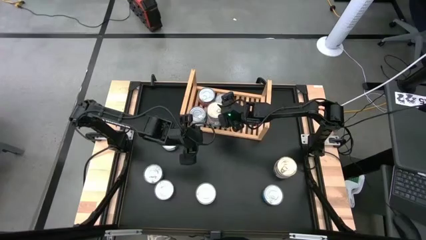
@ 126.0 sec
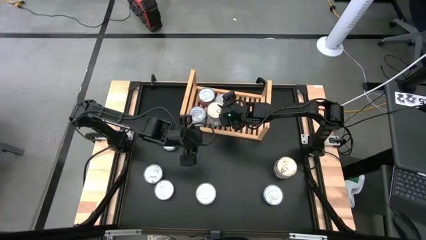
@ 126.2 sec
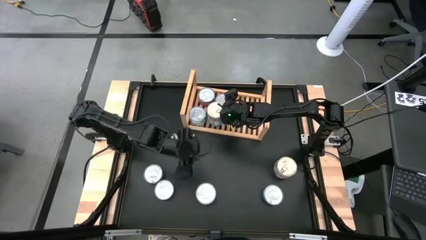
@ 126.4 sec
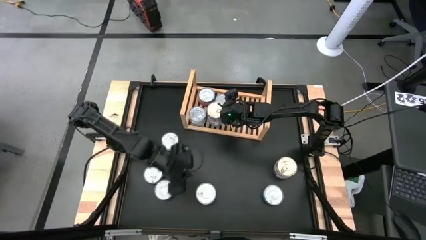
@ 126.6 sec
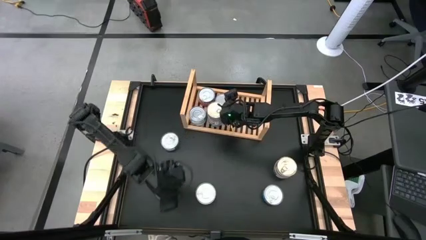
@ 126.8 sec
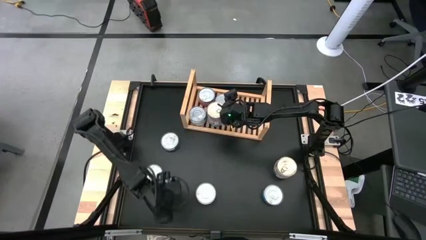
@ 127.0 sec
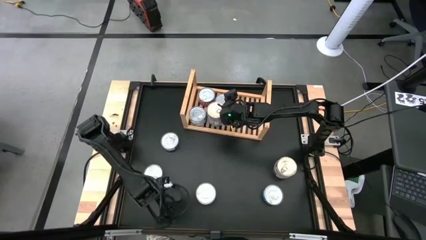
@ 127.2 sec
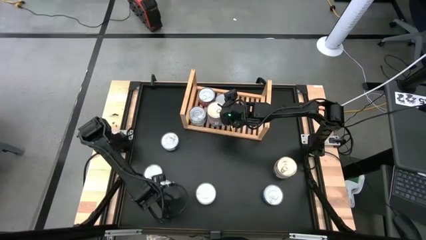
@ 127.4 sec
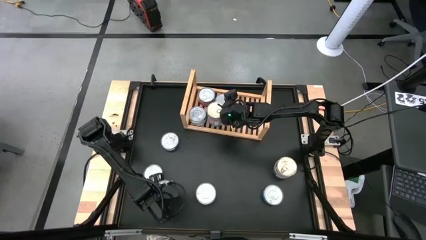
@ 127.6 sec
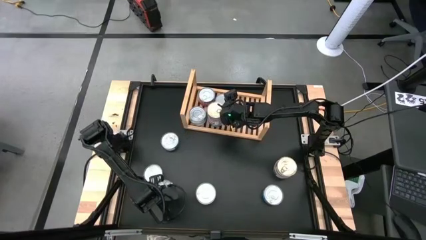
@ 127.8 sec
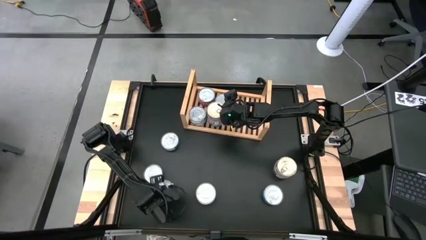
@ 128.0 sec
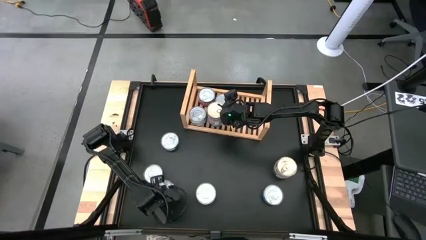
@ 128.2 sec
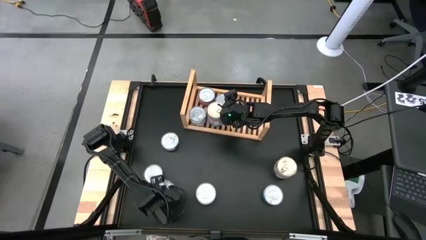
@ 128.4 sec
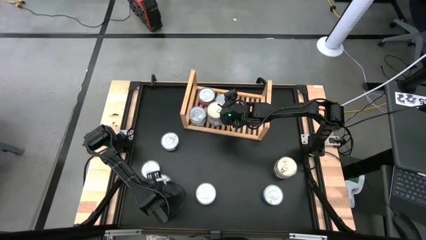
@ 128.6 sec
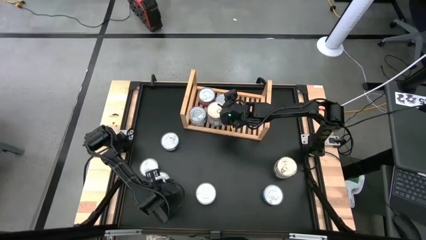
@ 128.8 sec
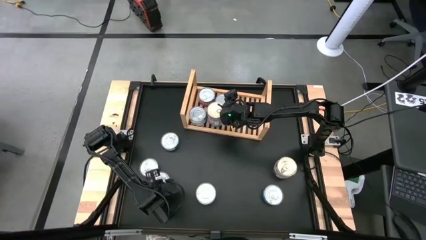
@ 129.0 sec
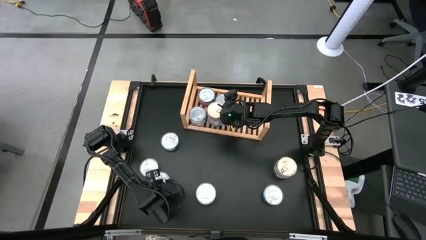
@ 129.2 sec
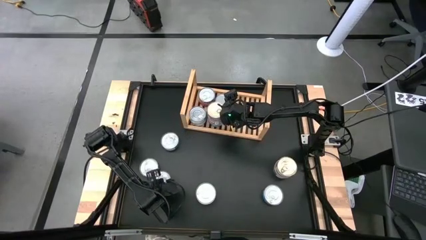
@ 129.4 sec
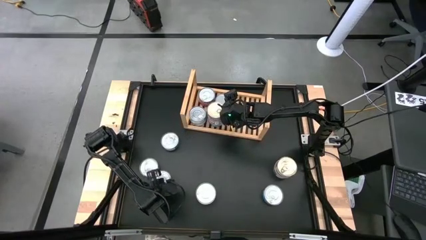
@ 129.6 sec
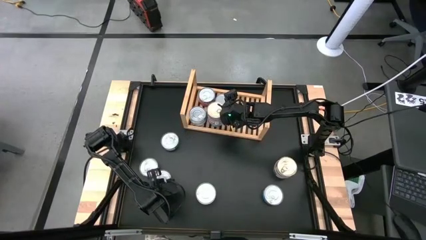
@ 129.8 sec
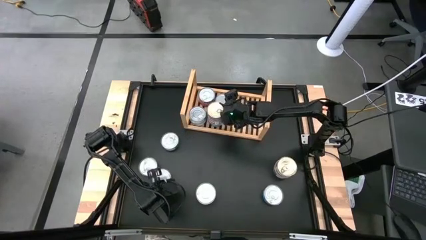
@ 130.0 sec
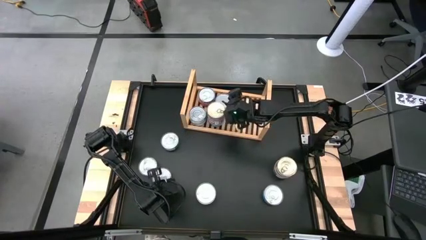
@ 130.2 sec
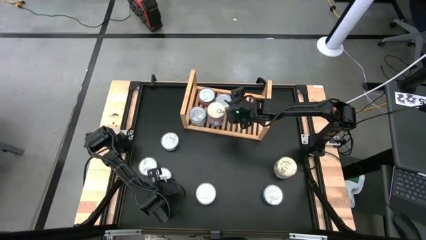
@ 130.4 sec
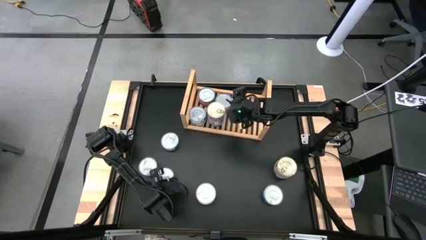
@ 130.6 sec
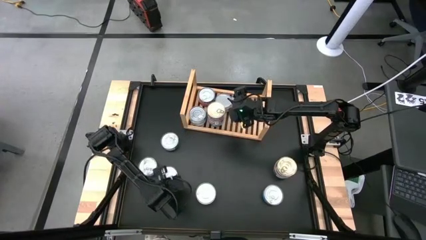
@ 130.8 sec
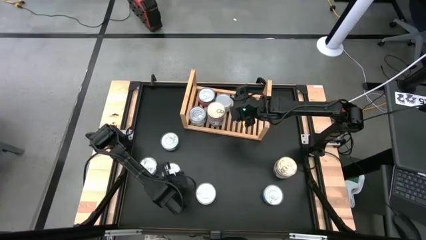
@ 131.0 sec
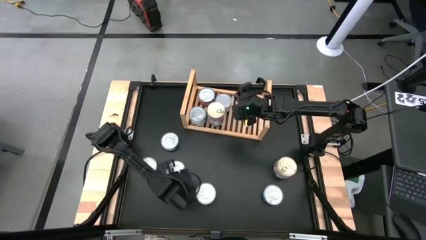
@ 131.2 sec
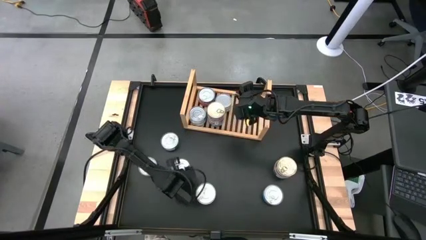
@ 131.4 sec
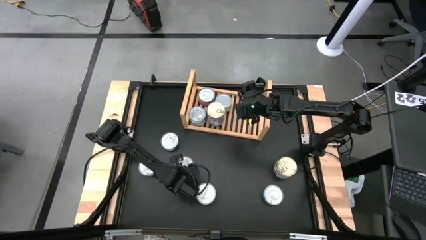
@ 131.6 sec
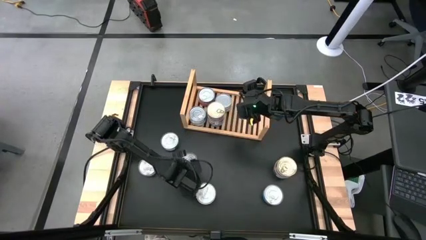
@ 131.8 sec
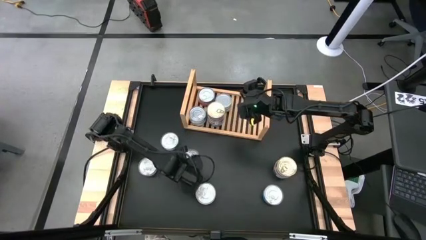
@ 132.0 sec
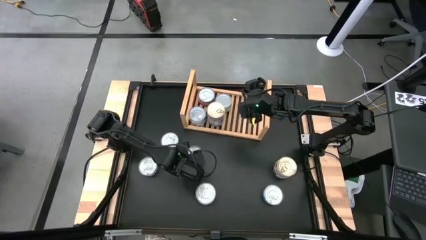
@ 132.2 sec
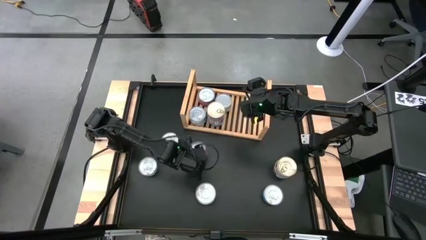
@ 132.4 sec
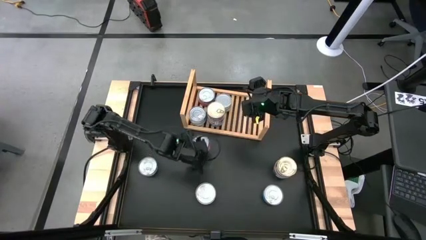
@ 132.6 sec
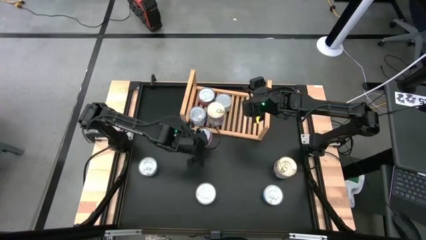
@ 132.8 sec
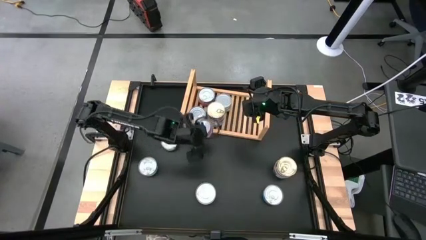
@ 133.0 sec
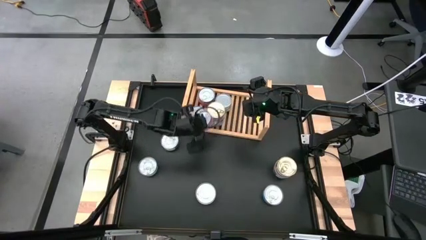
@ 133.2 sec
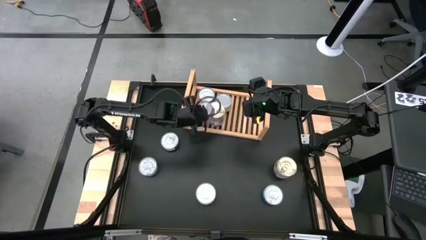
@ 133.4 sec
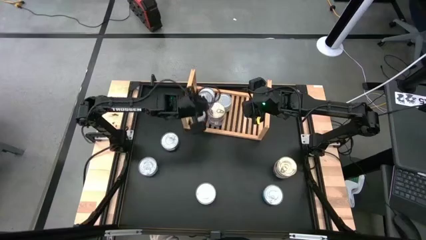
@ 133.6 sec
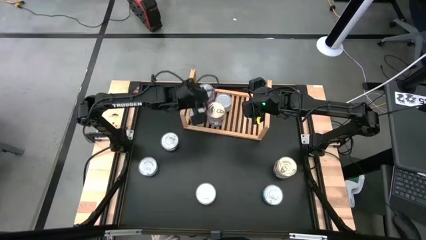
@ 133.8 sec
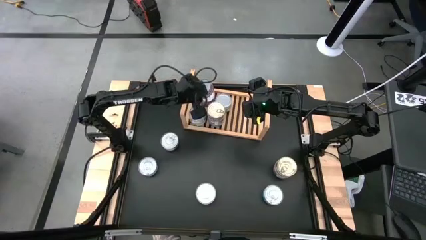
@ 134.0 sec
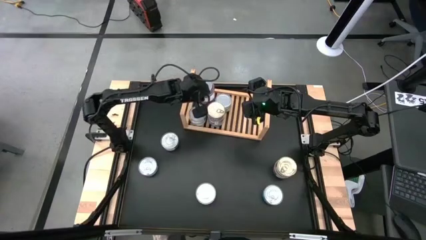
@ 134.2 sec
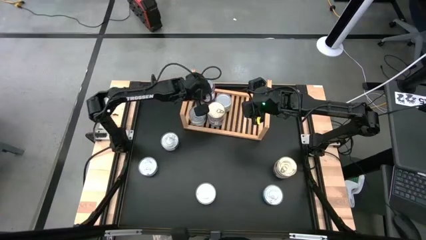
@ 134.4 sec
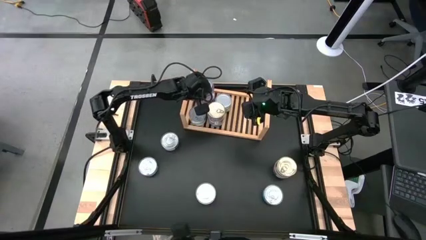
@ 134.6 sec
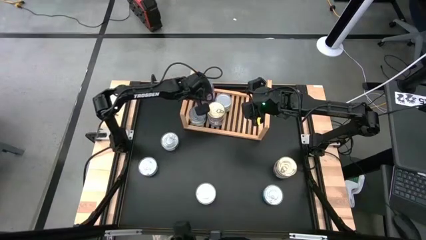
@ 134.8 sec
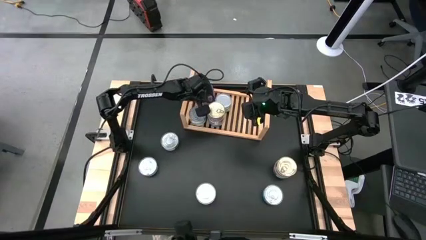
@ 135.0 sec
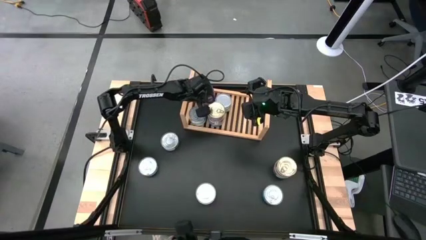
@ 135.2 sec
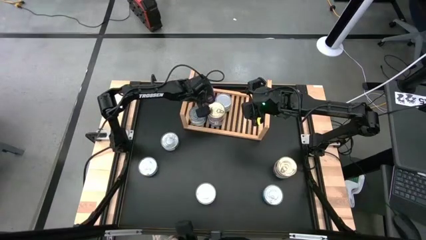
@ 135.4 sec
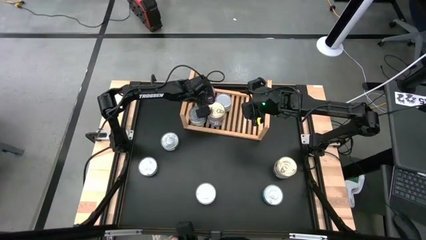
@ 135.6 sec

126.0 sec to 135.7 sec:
Task: Stack canned seafood by type on shelf
Stack the red tuna can on top of the other red tuna can
